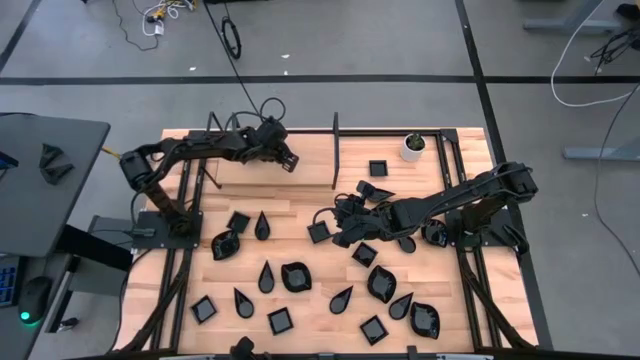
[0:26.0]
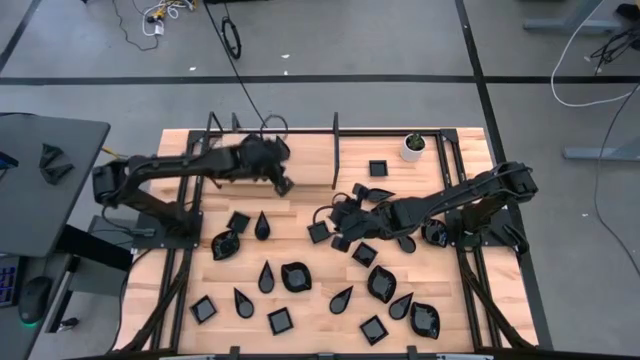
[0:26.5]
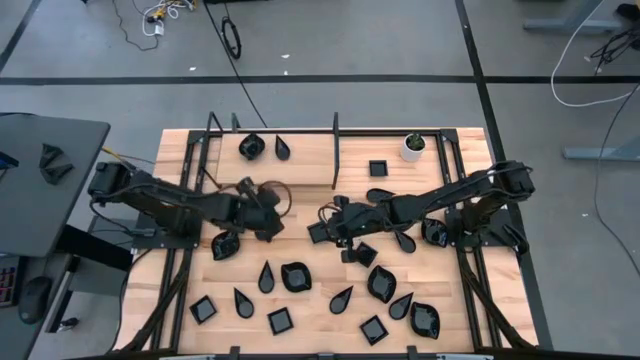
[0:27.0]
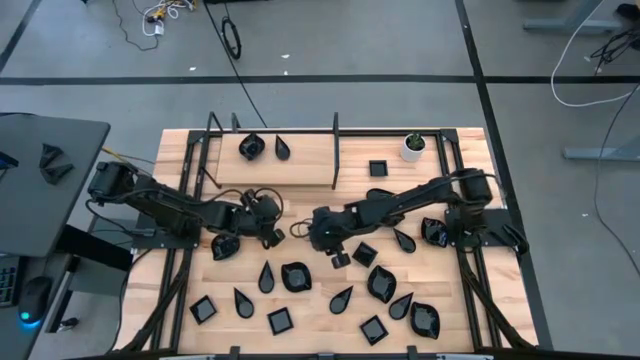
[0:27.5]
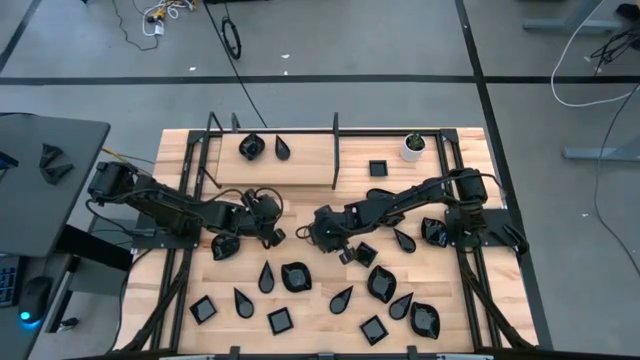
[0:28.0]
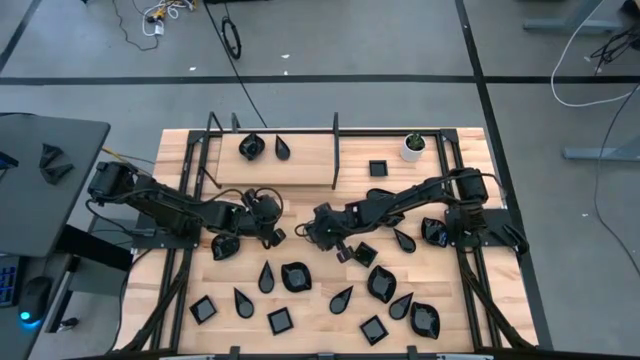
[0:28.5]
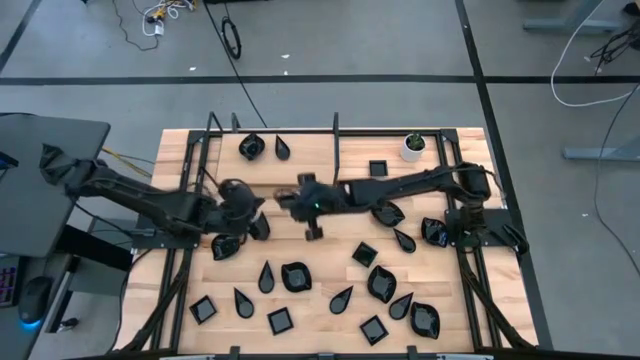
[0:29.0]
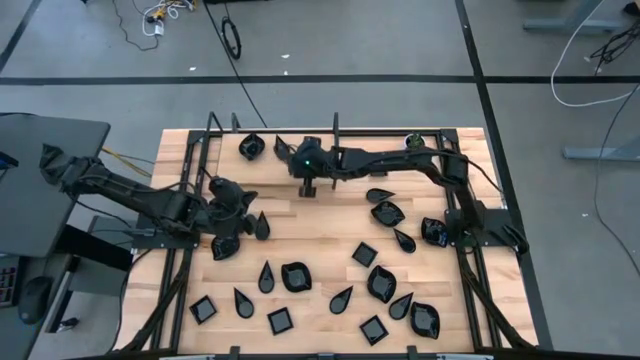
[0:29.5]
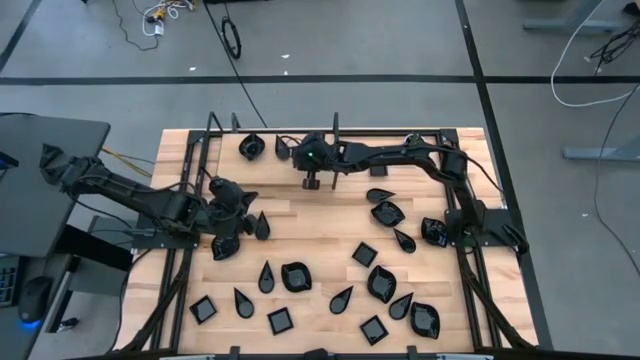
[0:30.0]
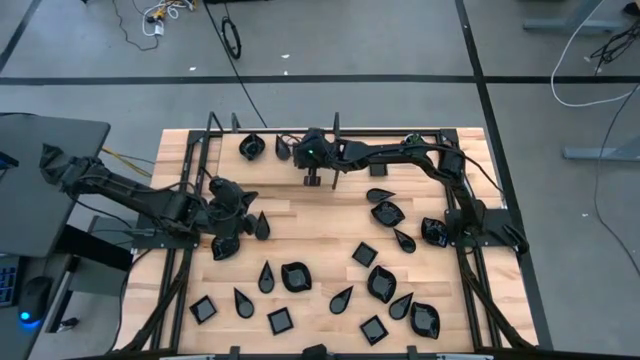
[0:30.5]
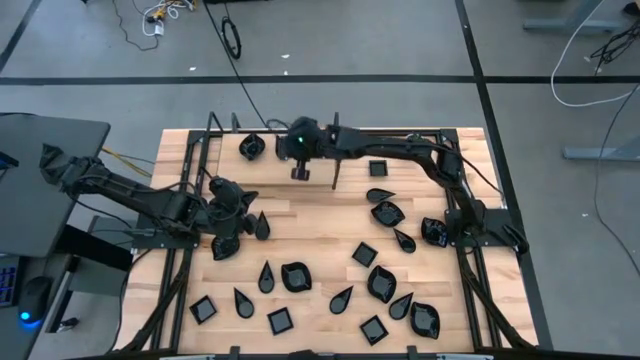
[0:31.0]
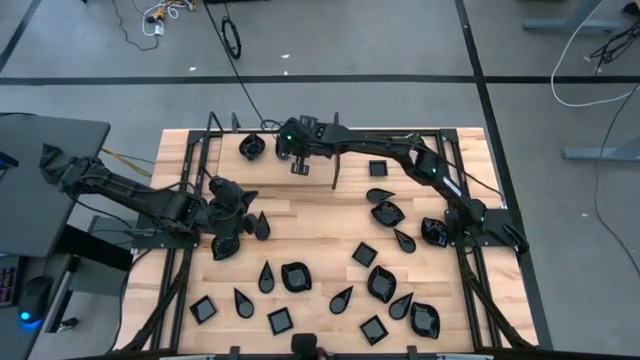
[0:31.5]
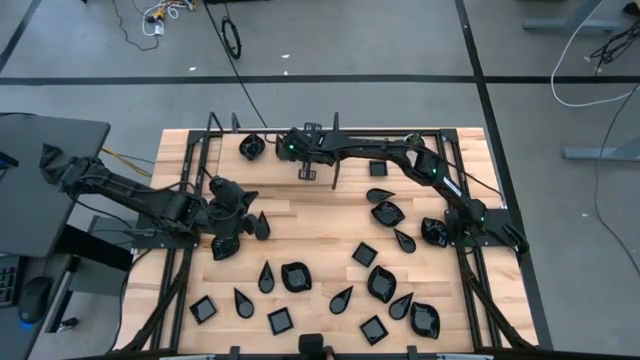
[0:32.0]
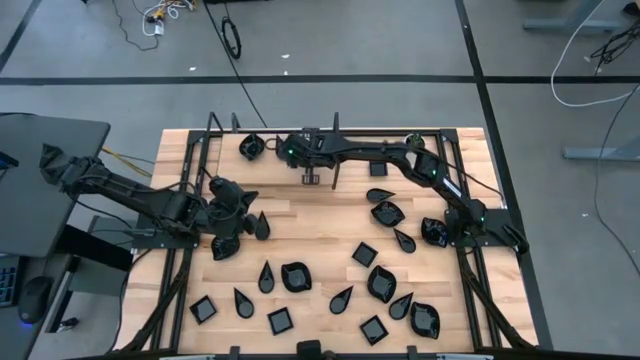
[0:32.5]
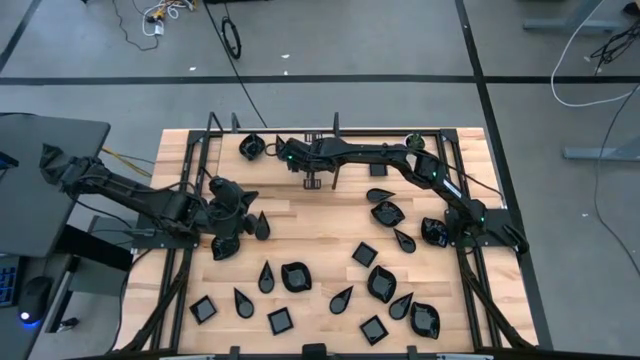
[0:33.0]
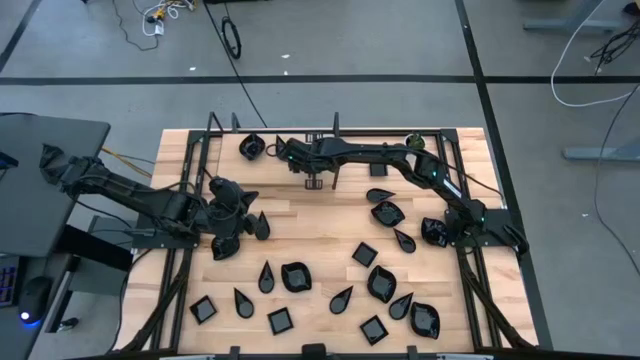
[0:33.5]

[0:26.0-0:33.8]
Task: Pick & Place Mini shaped plates
Put the black square plate on the shelf

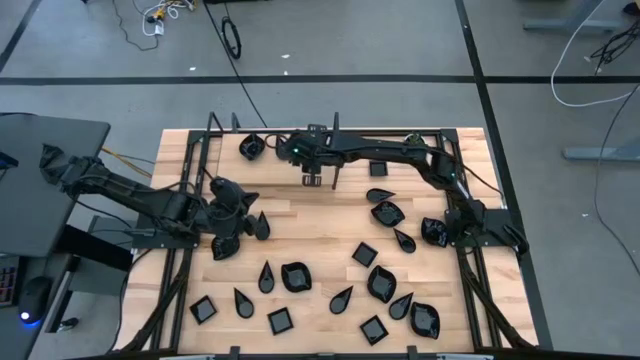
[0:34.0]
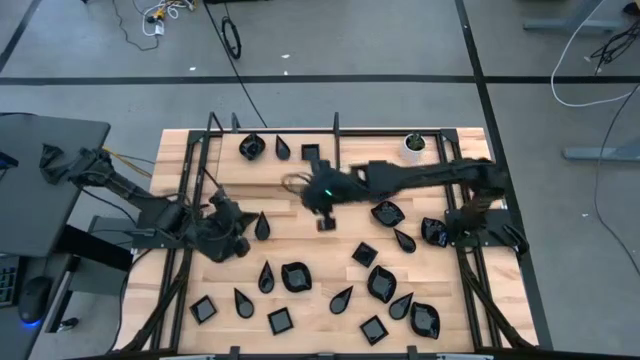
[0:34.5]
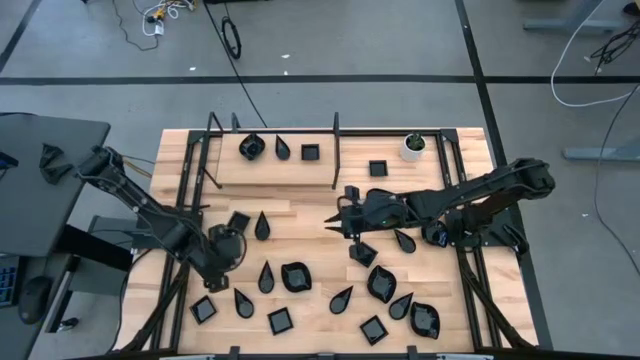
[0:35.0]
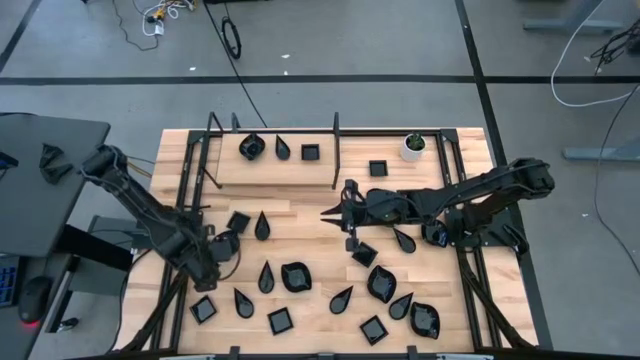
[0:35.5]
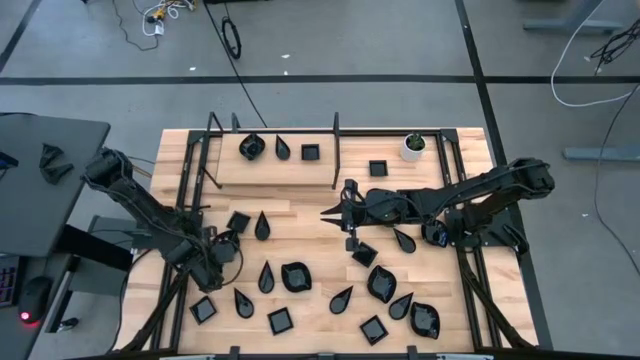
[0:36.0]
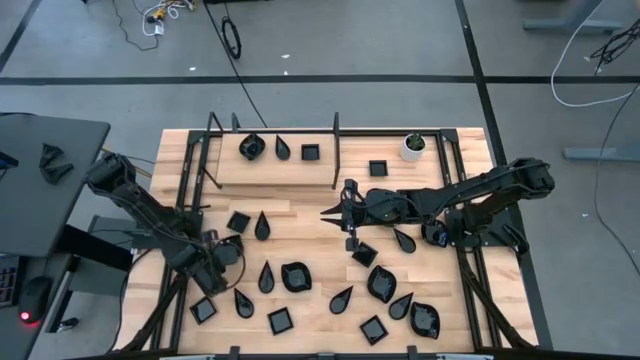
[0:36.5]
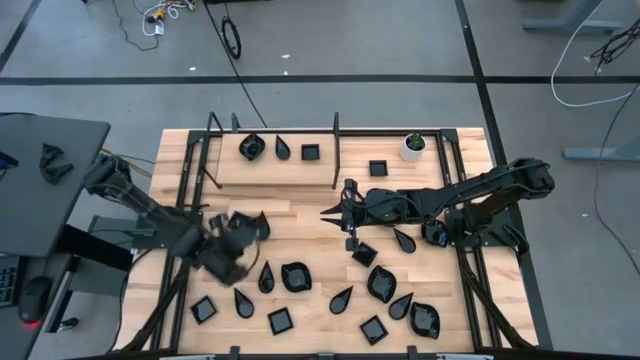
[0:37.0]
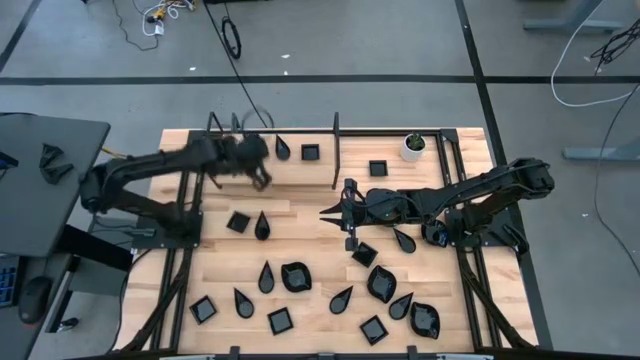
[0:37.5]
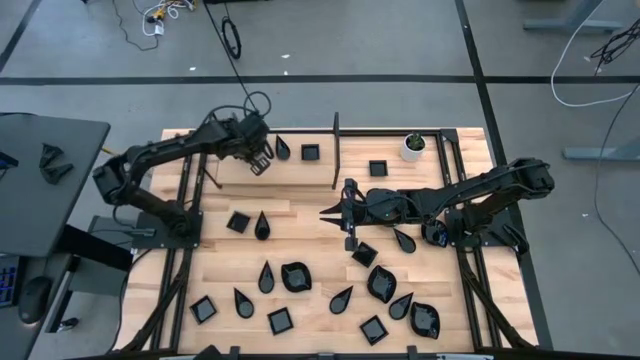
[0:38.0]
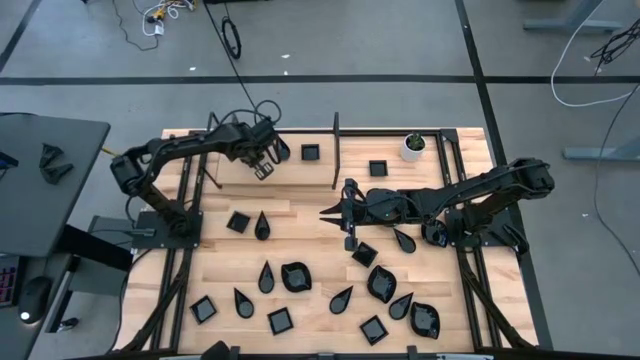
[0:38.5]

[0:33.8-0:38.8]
Stack the black leaf-shaped plate on top of the black leaf-shaped plate on the shelf

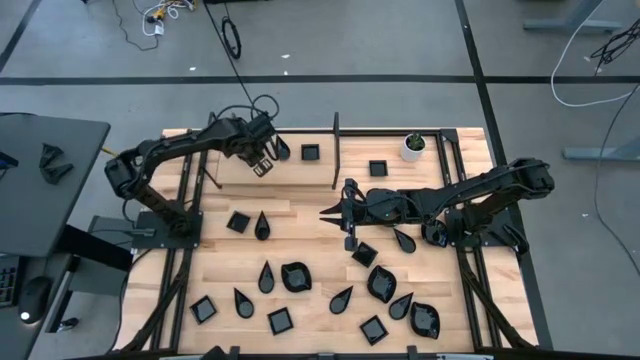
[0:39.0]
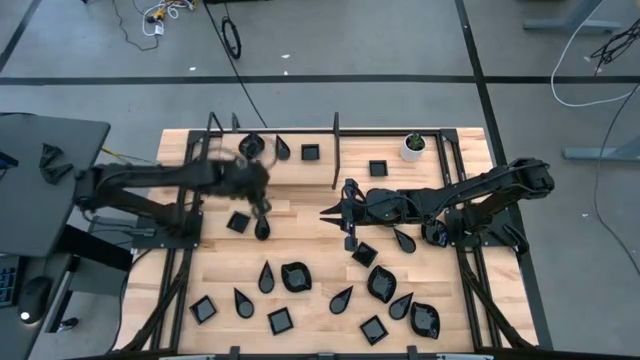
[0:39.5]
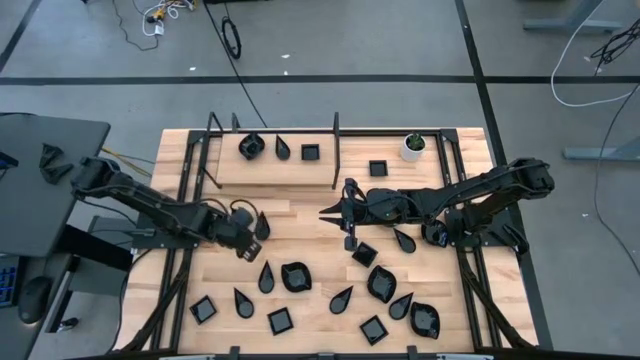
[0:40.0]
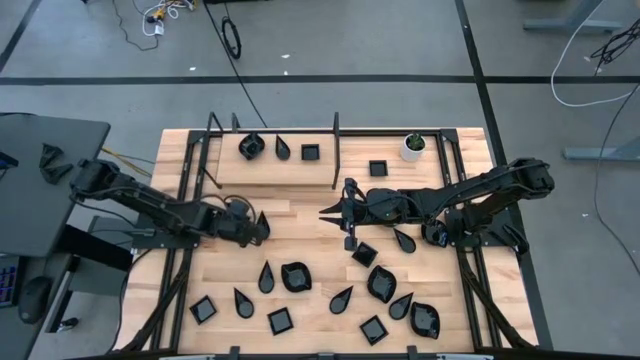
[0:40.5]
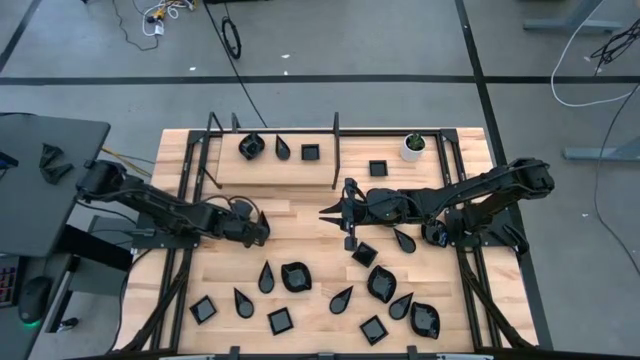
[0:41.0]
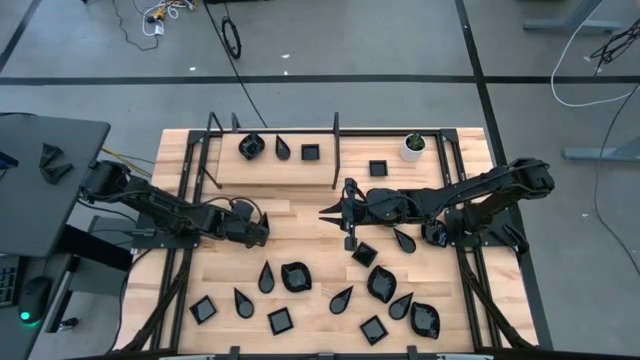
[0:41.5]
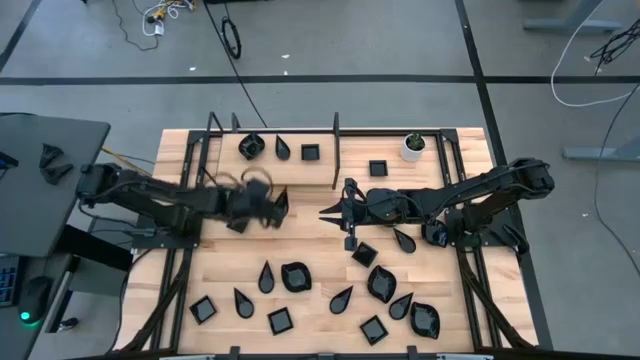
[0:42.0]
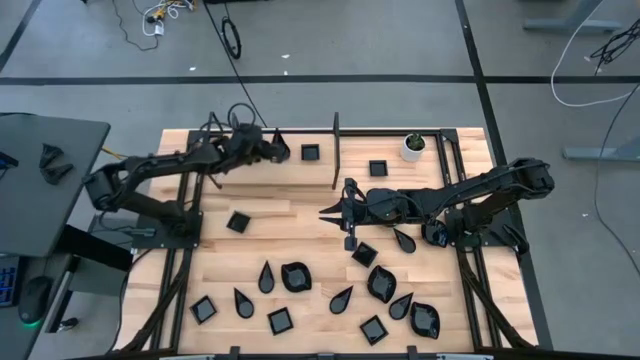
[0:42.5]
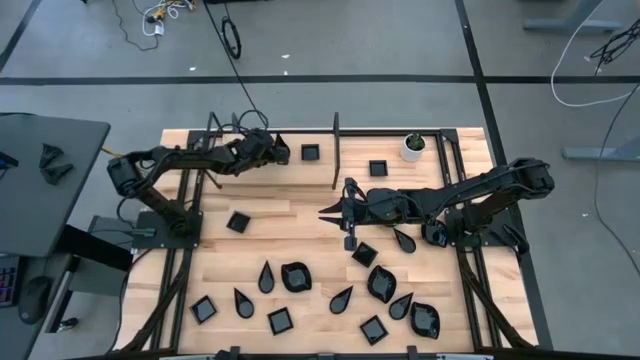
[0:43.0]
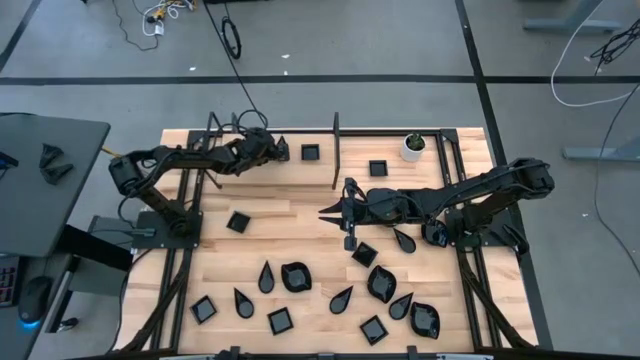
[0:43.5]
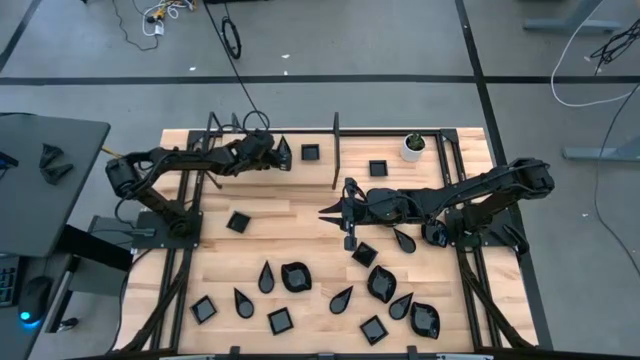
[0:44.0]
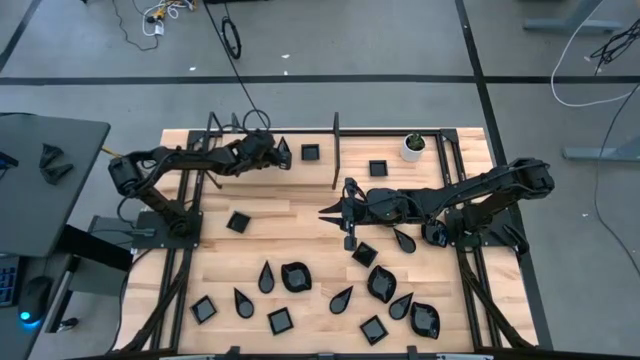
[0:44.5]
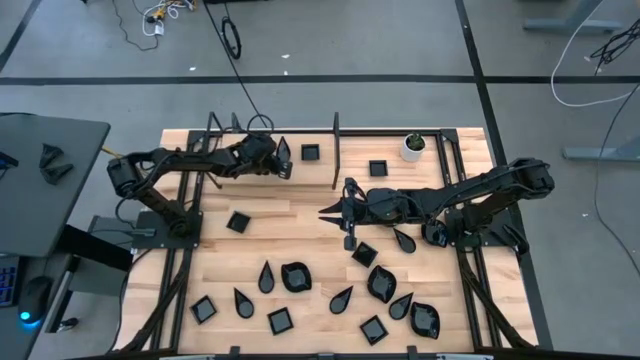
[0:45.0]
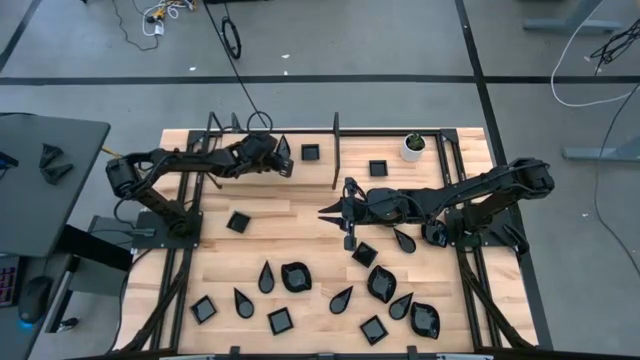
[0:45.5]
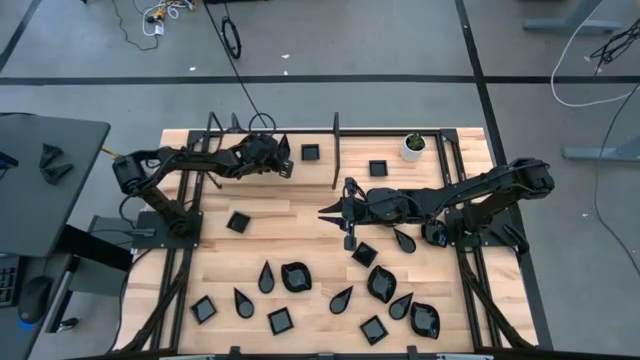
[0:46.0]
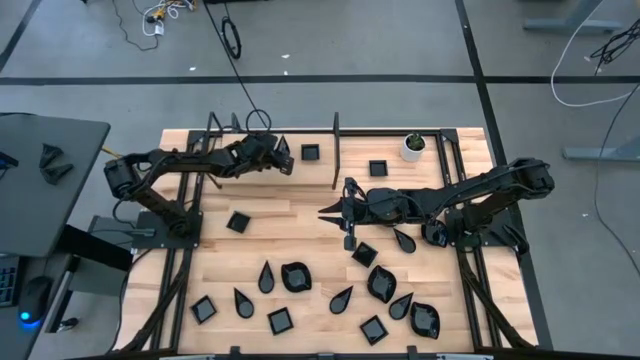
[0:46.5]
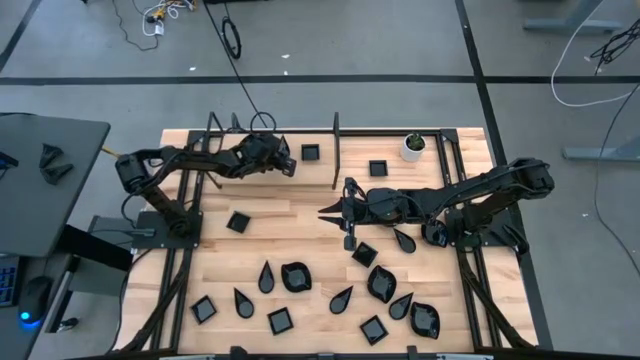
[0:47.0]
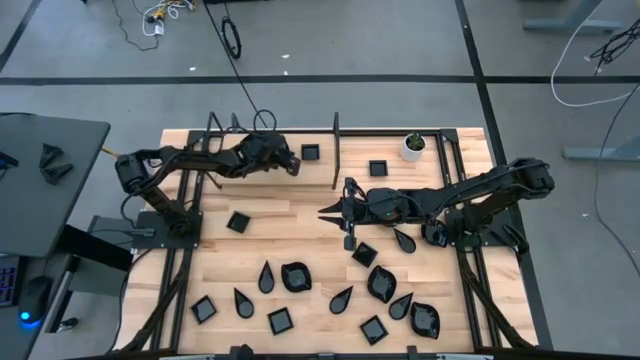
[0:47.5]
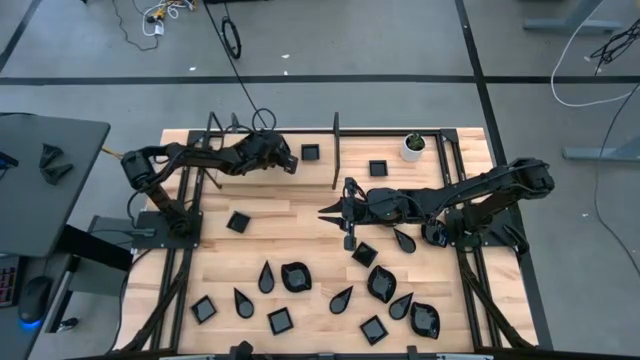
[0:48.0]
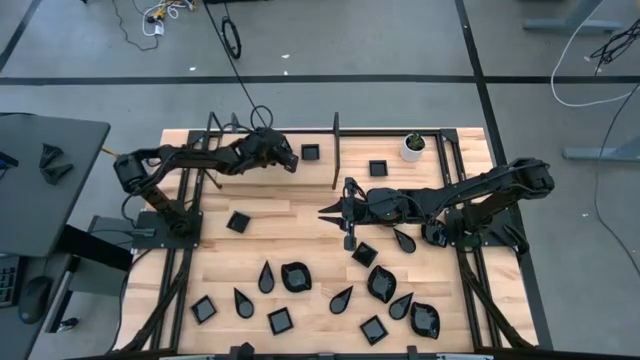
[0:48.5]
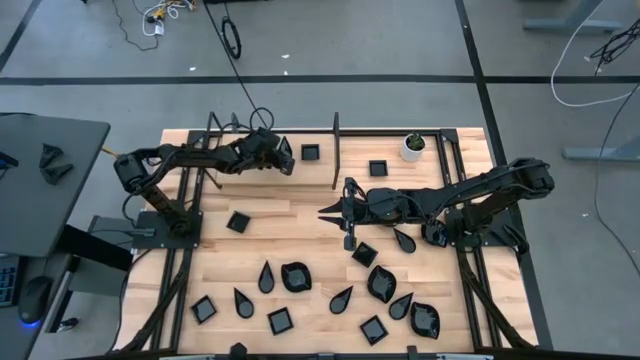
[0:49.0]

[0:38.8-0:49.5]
Stack the black drop-shaped plate on top of the black drop-shaped plate on the shelf
